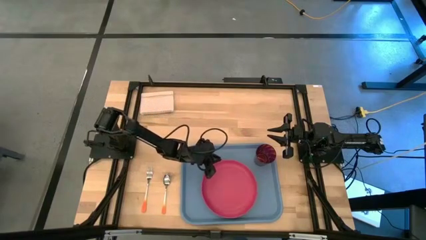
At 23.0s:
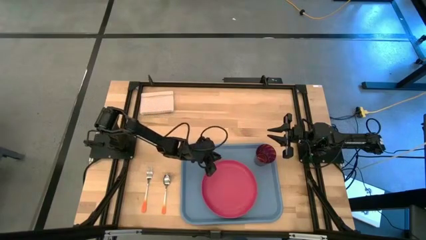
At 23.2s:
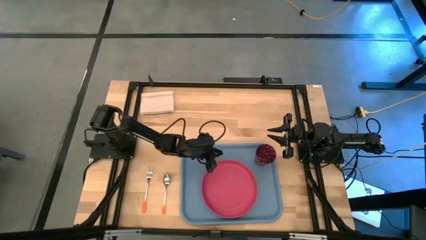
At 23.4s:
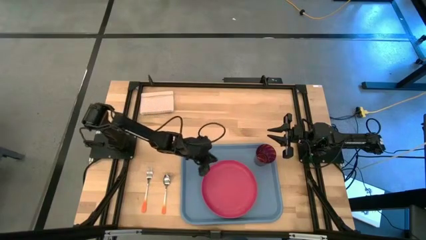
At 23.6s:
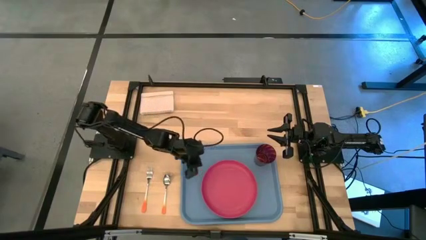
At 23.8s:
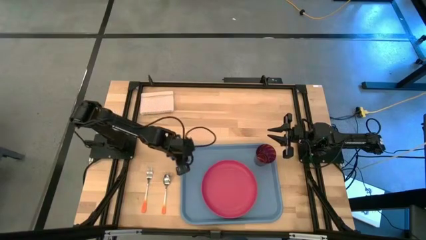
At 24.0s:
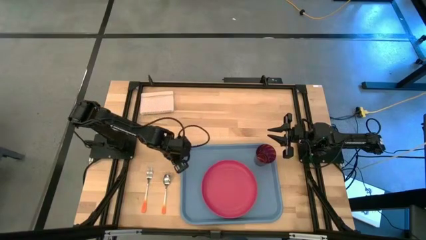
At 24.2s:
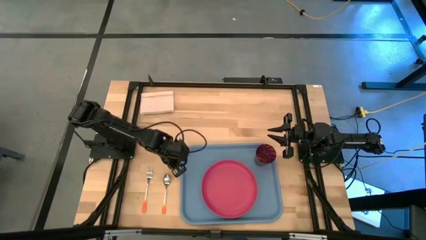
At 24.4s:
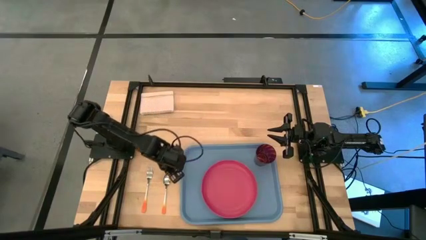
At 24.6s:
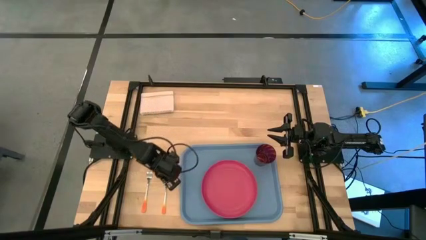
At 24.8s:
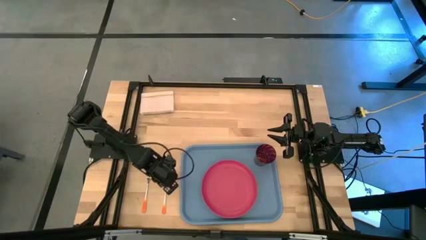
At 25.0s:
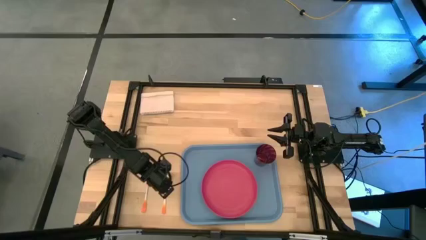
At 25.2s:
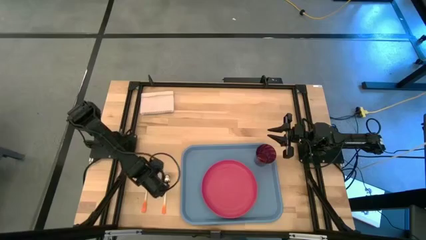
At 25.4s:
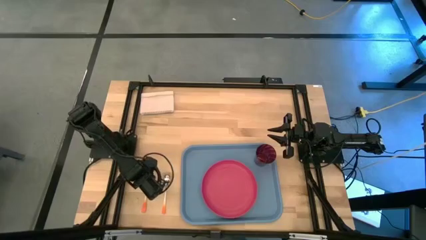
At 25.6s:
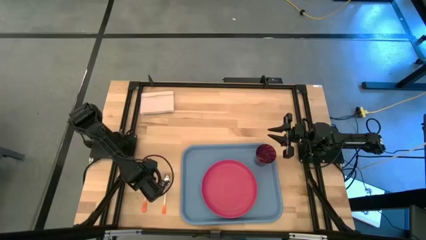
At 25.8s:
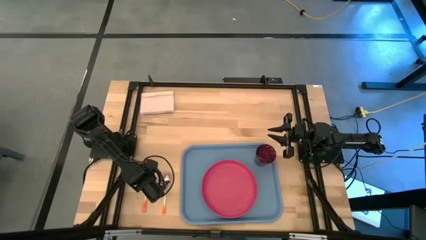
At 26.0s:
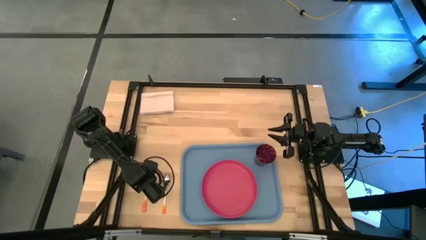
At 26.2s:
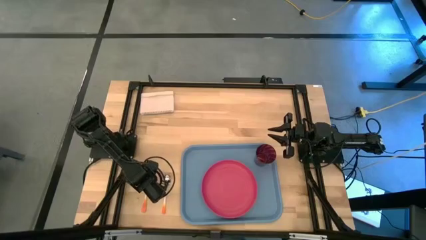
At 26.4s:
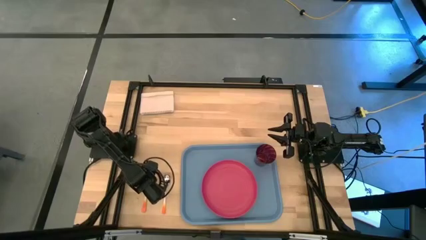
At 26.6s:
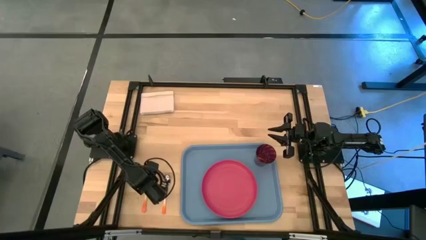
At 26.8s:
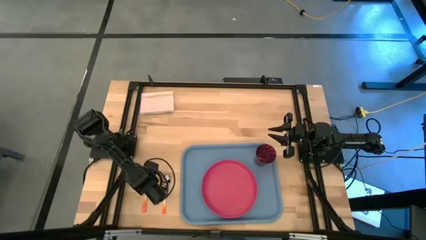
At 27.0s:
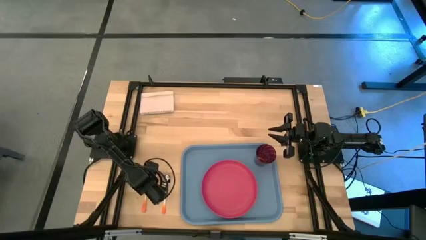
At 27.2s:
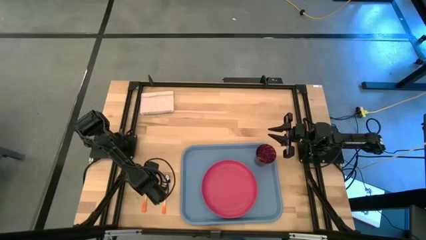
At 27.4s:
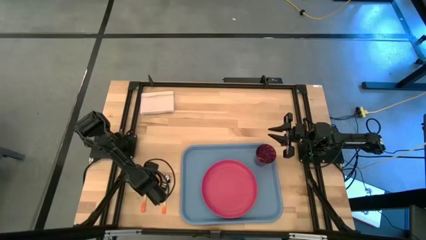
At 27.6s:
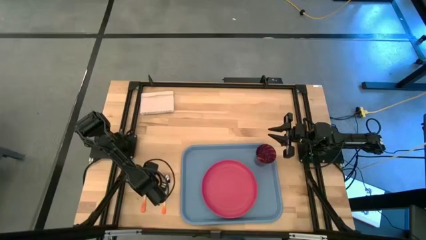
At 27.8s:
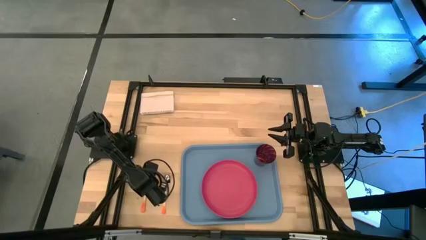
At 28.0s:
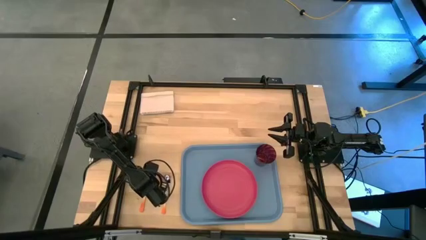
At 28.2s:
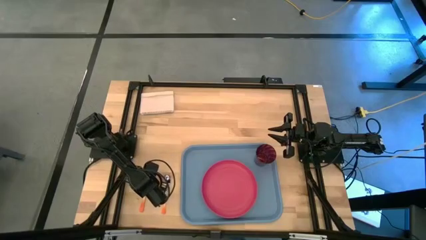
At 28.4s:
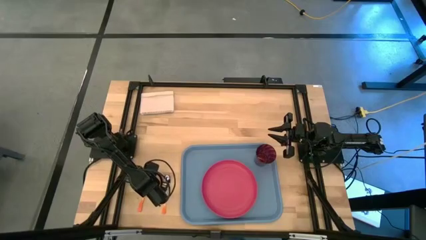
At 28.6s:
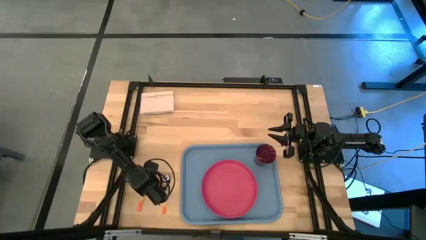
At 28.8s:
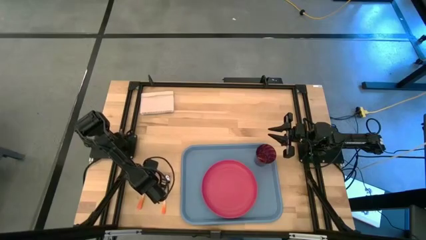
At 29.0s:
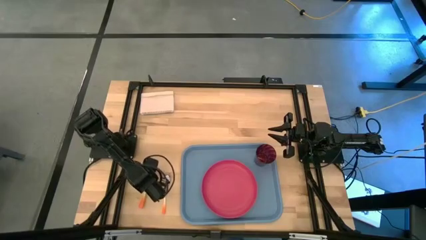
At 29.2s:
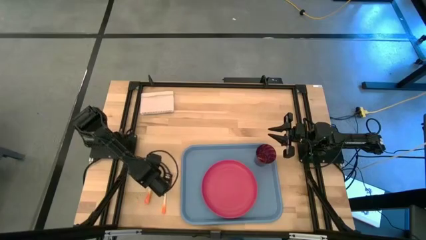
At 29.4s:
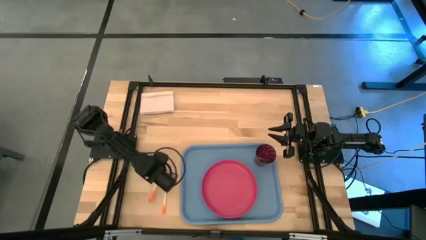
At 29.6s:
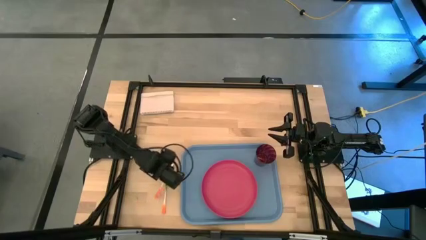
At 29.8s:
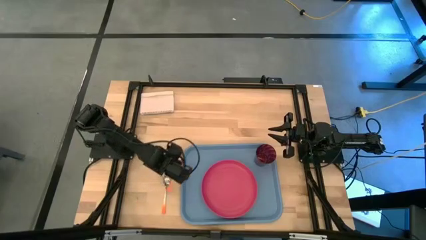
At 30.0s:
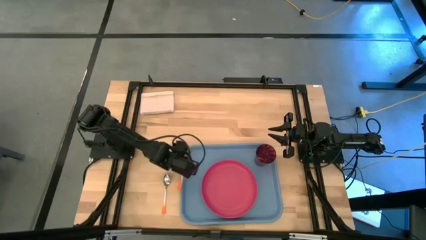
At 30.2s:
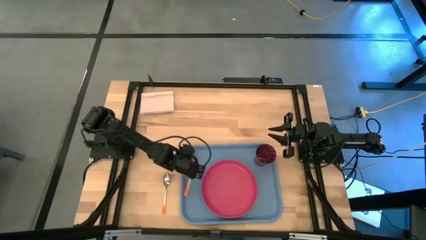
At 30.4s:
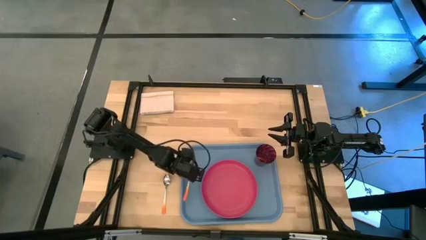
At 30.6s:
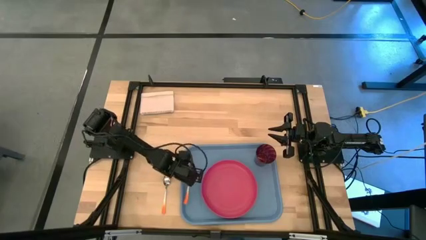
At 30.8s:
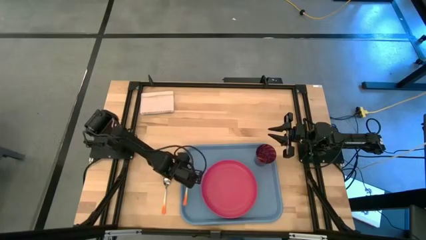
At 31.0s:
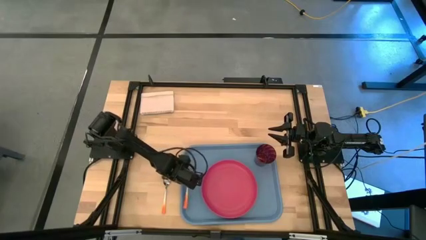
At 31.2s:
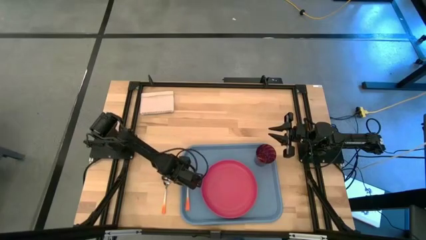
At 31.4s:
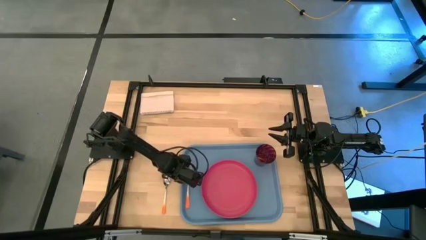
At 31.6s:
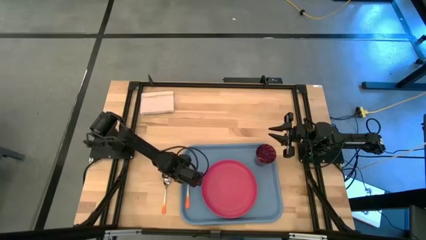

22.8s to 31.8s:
Task: Pick and place plate/cup/fork/spoon on tray
Put the orange and silver fork on the left side of the blue tray

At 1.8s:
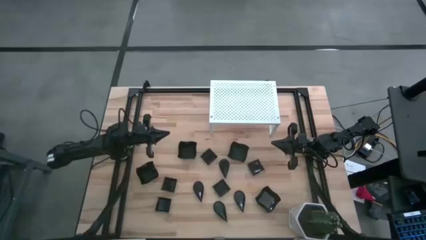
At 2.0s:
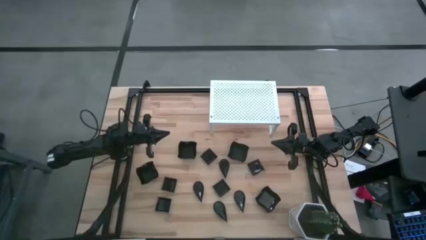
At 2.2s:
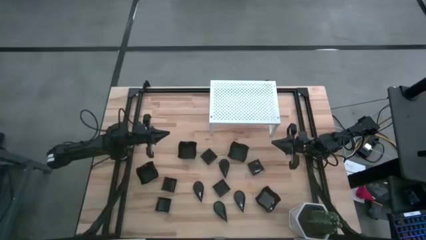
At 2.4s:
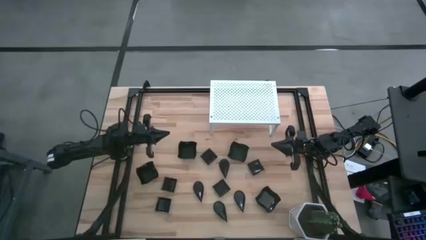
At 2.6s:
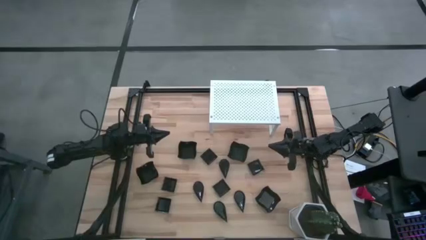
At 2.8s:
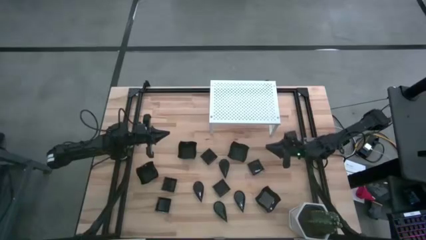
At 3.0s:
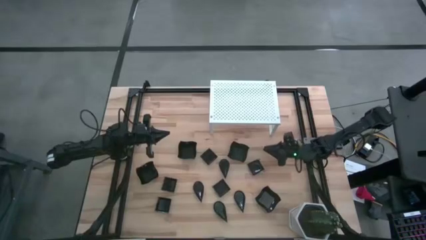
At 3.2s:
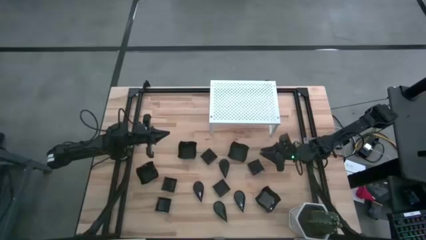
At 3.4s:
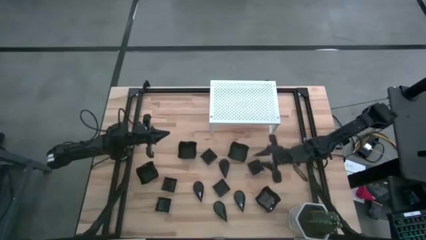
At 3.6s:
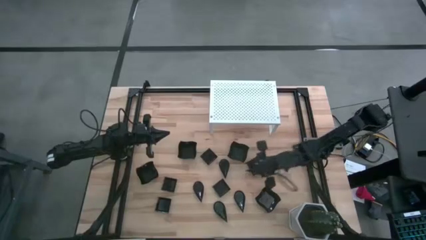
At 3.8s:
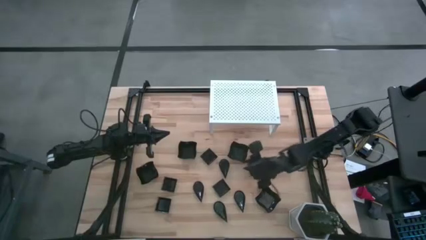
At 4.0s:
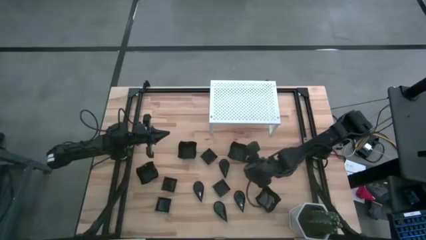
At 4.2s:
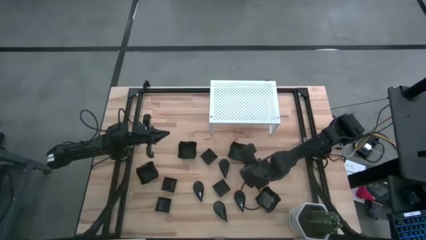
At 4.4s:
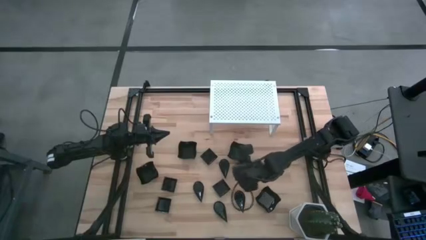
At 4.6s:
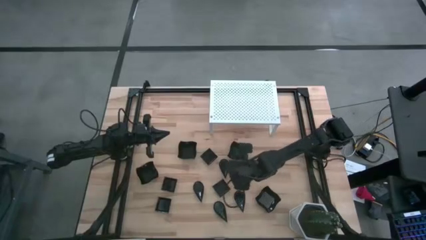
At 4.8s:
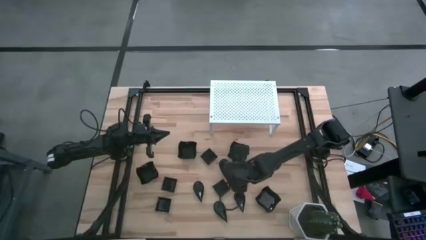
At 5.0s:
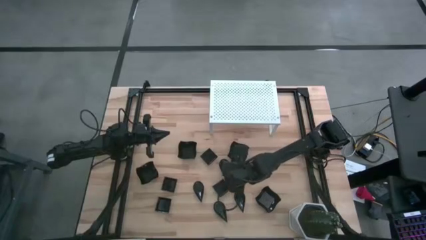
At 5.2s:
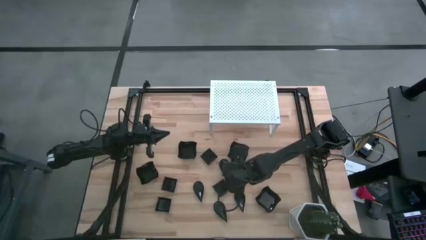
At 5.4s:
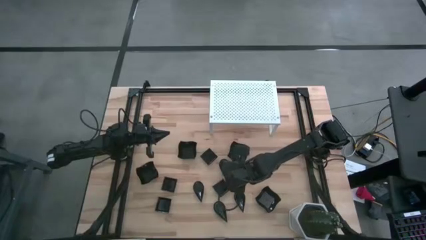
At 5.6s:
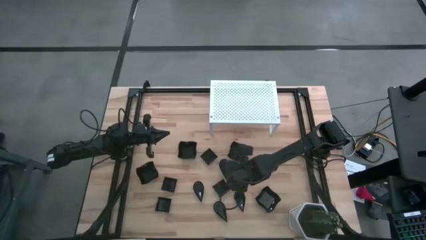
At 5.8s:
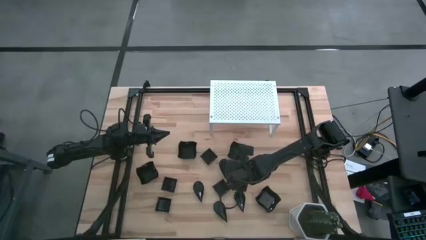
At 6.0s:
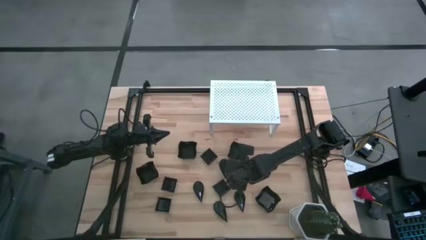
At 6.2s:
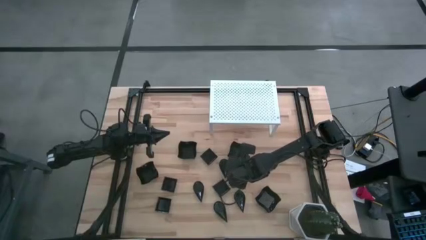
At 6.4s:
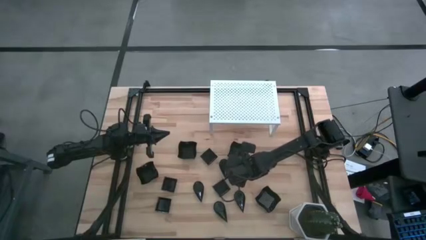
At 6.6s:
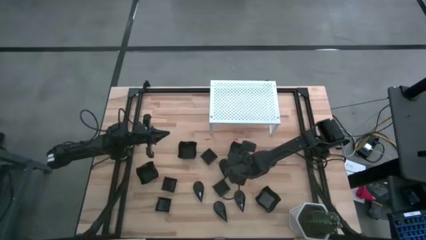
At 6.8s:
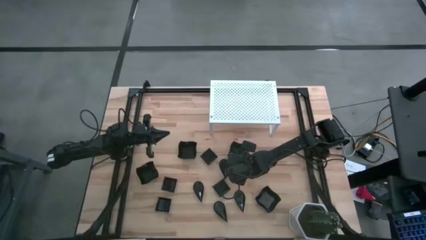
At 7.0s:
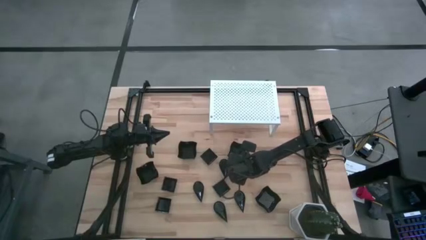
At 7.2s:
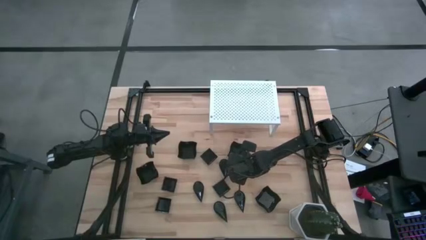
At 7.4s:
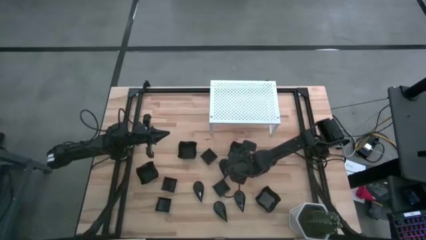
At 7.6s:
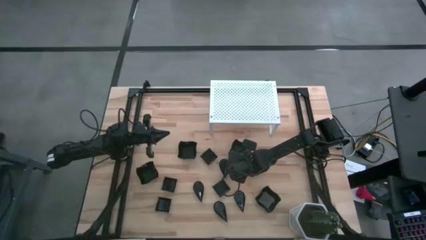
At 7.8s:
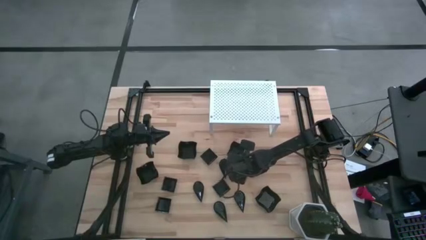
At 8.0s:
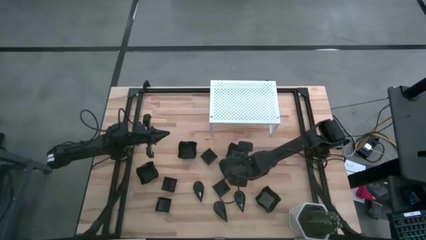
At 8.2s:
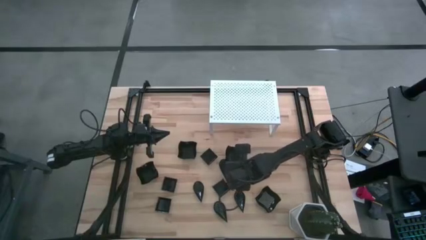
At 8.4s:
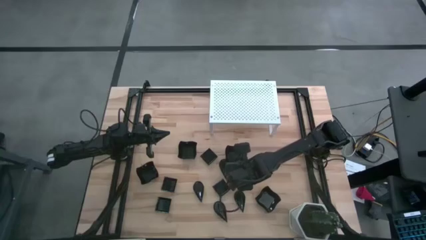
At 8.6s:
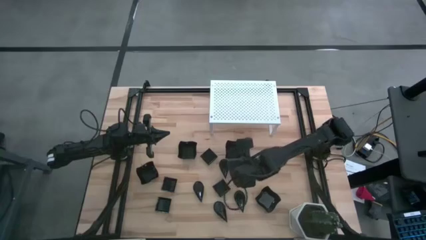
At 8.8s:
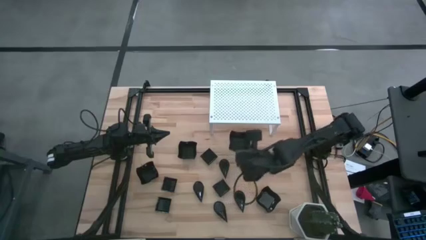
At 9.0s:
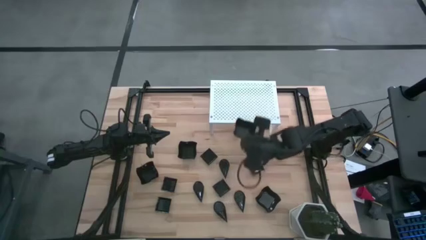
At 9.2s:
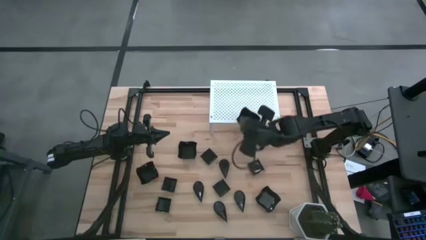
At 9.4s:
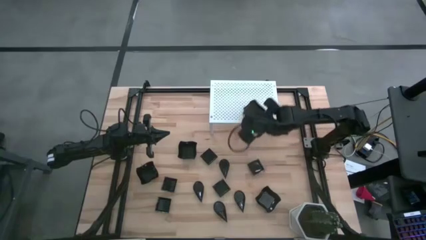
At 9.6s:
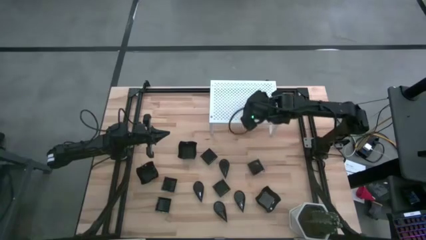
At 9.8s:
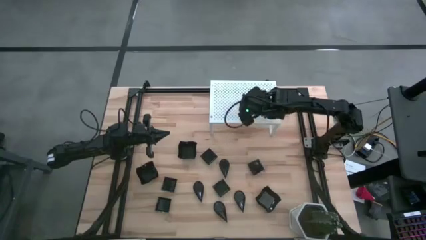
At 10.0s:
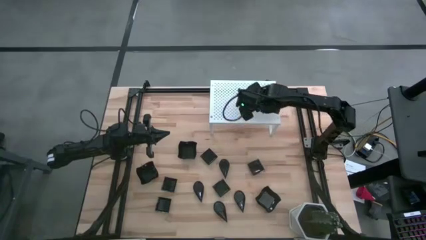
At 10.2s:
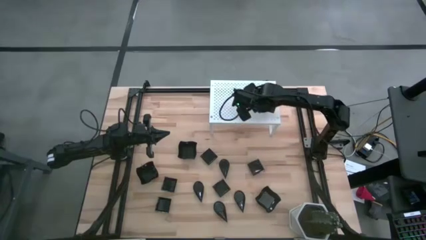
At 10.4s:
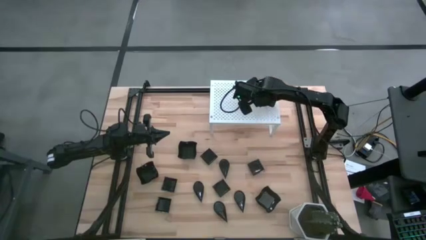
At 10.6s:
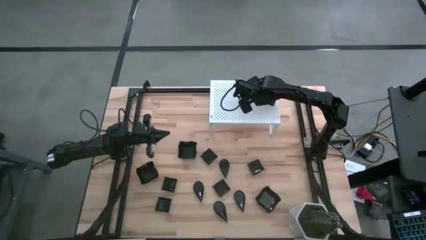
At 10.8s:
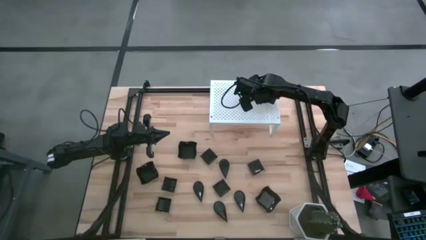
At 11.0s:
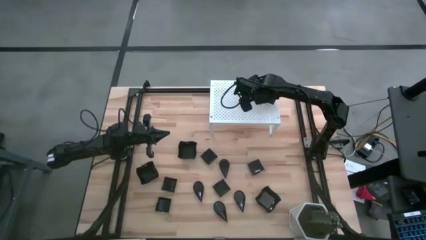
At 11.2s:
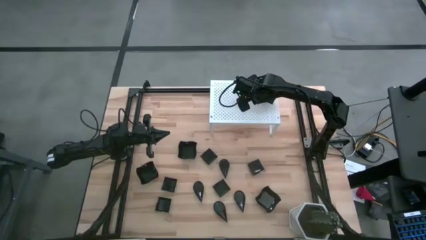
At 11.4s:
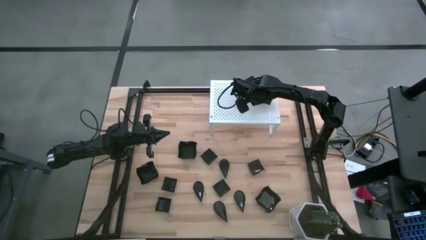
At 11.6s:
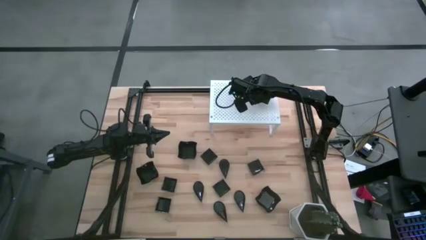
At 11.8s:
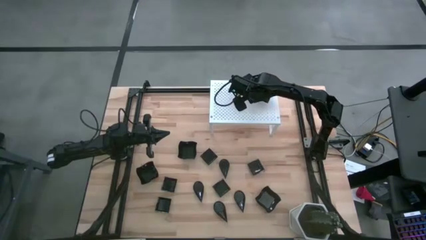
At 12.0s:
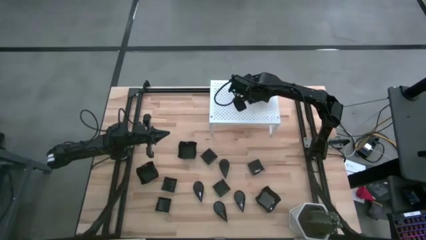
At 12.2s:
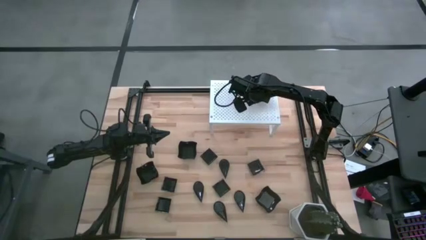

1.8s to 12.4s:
Task: Pick & Place Mini shaped plates
Put the distorted square plate on the shelf
